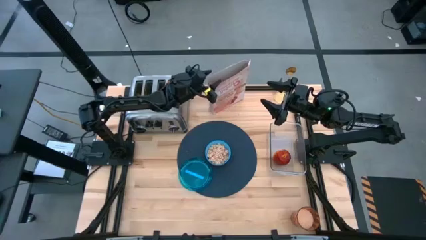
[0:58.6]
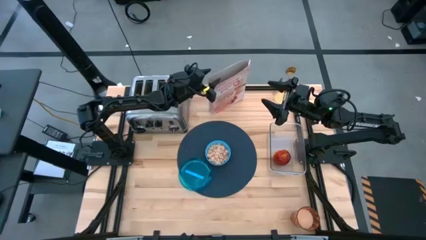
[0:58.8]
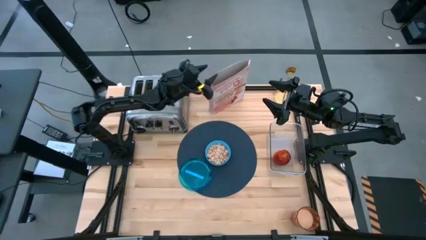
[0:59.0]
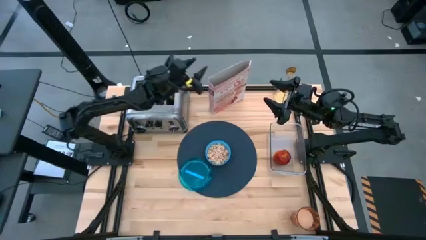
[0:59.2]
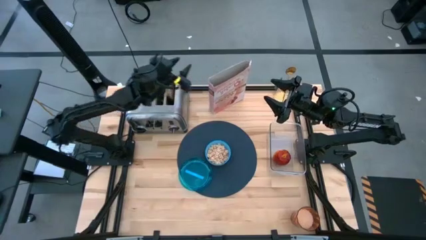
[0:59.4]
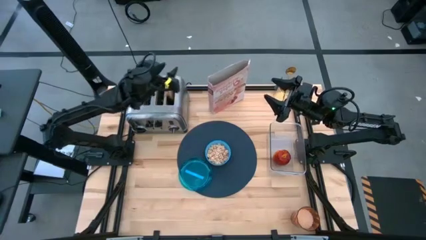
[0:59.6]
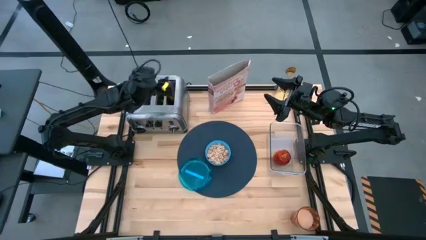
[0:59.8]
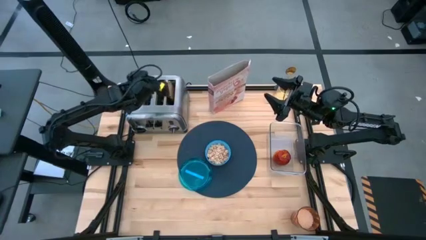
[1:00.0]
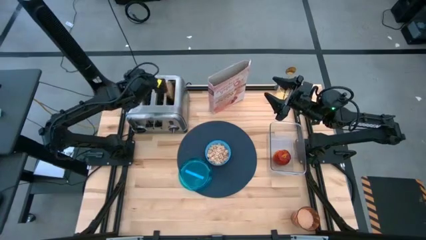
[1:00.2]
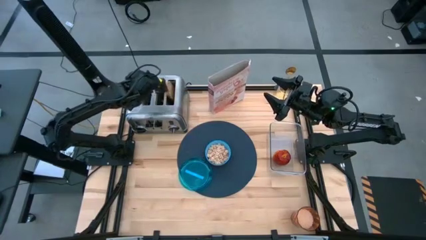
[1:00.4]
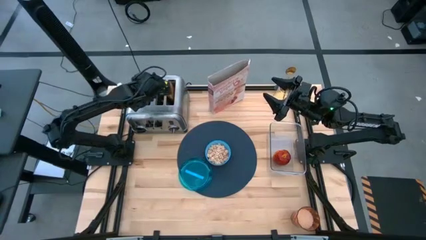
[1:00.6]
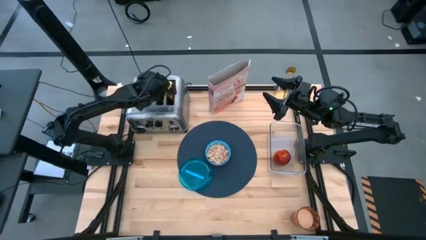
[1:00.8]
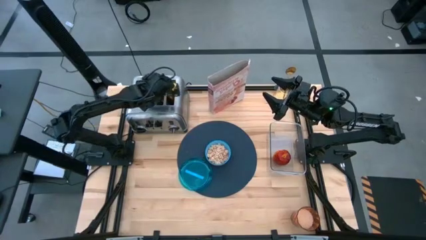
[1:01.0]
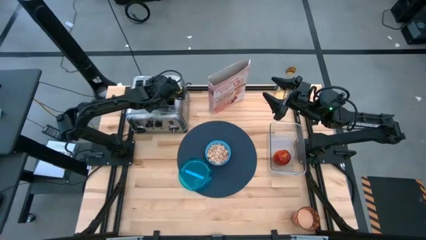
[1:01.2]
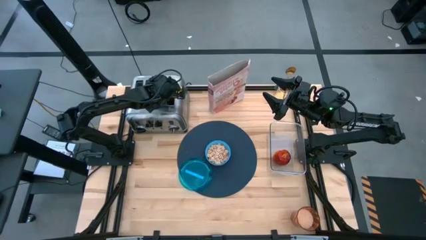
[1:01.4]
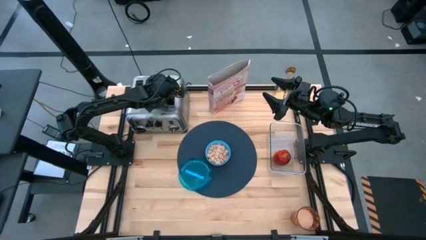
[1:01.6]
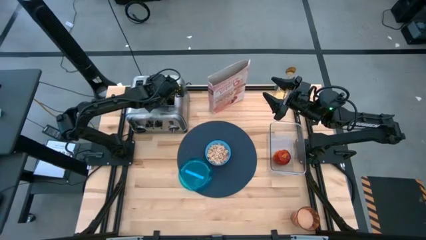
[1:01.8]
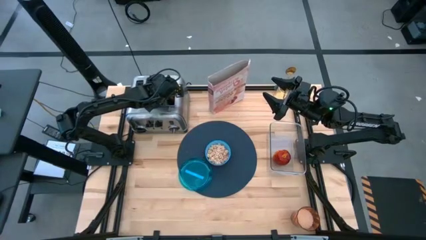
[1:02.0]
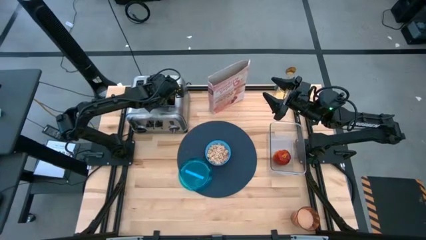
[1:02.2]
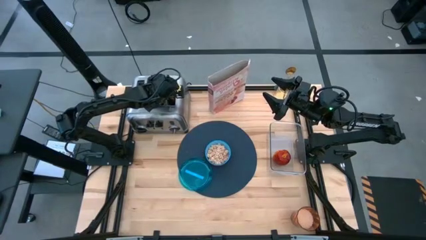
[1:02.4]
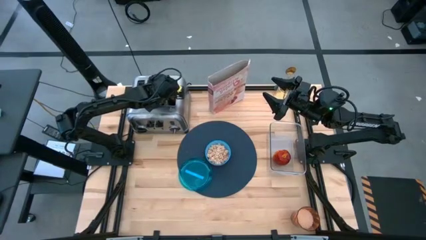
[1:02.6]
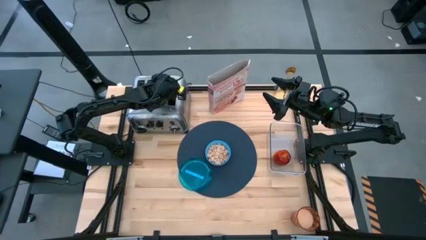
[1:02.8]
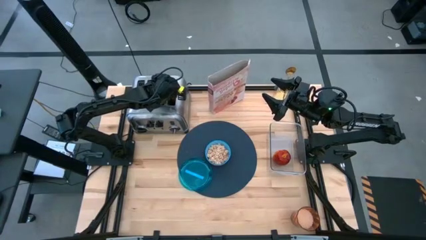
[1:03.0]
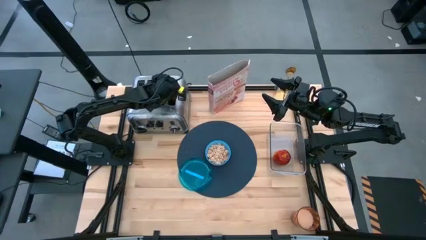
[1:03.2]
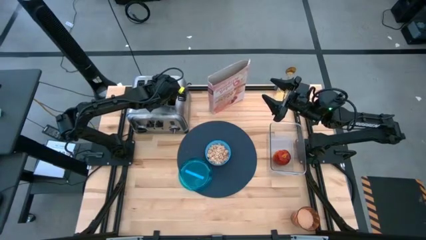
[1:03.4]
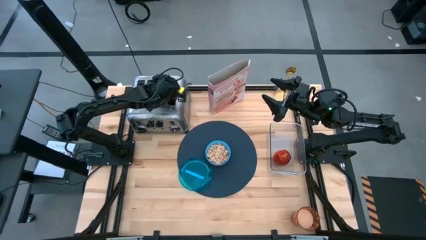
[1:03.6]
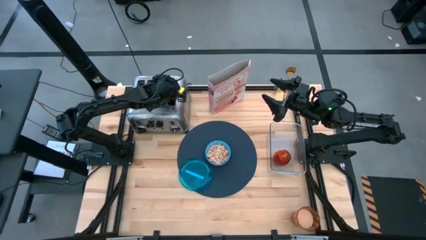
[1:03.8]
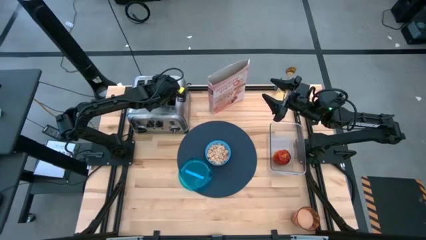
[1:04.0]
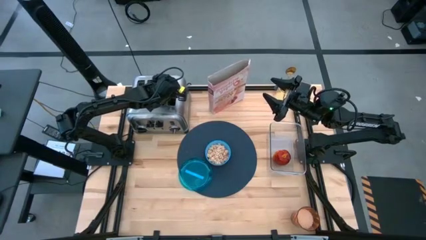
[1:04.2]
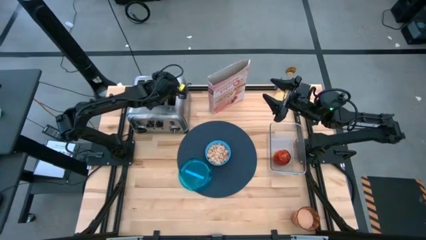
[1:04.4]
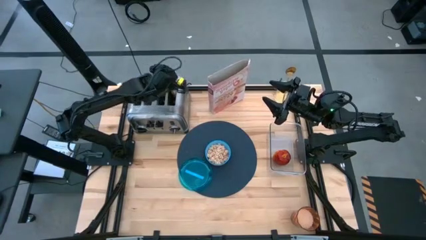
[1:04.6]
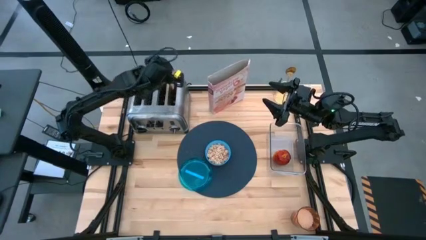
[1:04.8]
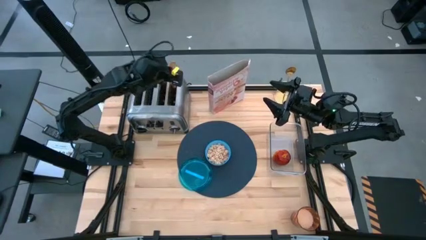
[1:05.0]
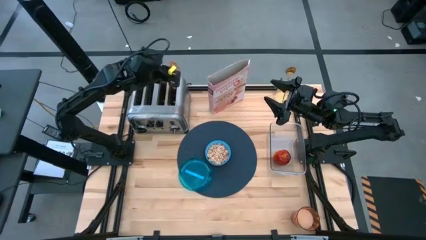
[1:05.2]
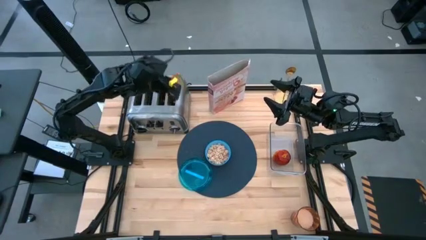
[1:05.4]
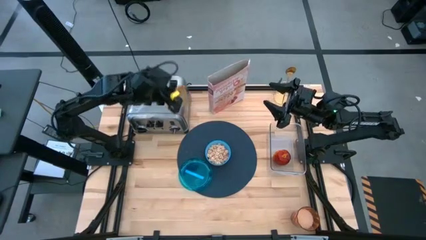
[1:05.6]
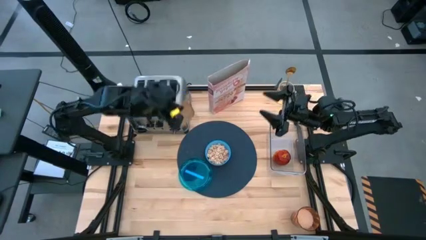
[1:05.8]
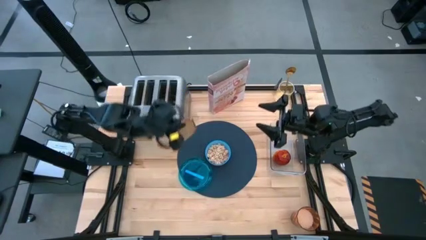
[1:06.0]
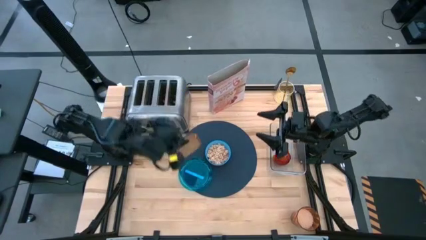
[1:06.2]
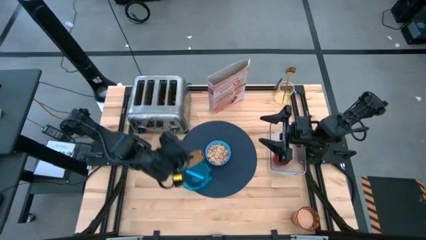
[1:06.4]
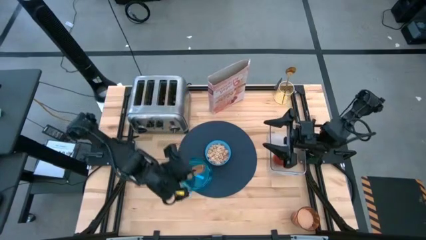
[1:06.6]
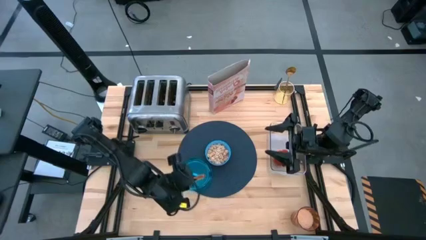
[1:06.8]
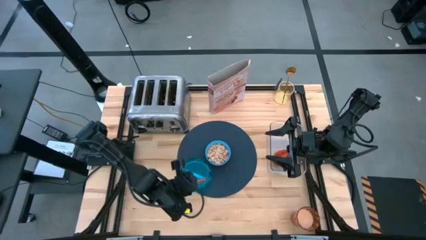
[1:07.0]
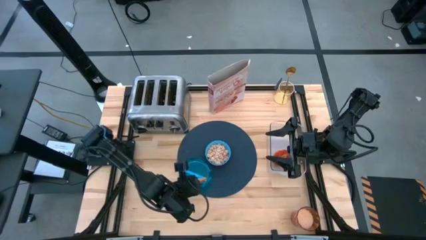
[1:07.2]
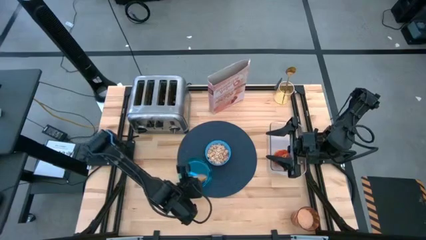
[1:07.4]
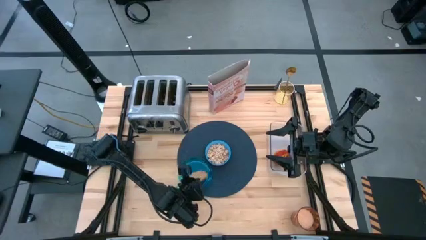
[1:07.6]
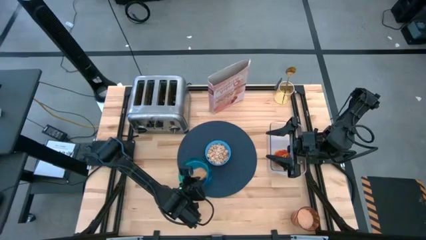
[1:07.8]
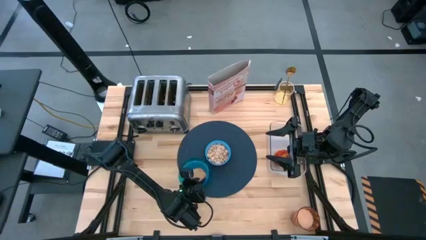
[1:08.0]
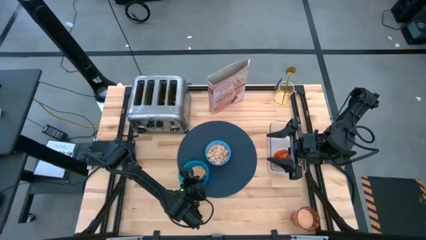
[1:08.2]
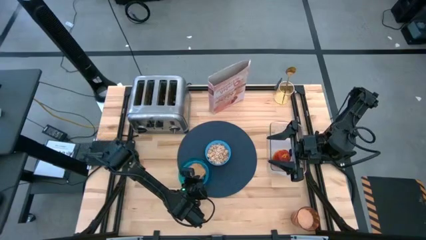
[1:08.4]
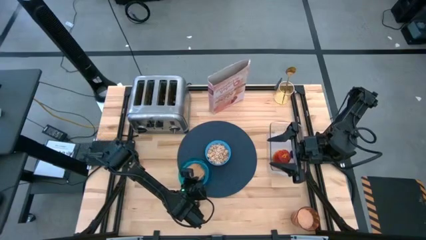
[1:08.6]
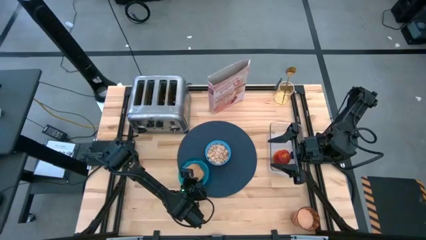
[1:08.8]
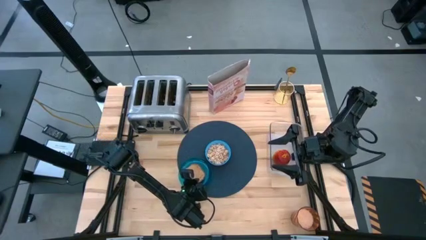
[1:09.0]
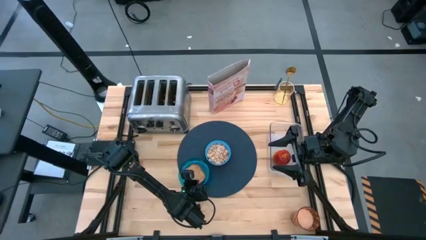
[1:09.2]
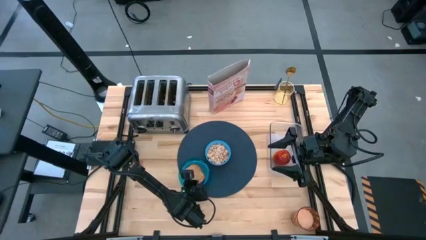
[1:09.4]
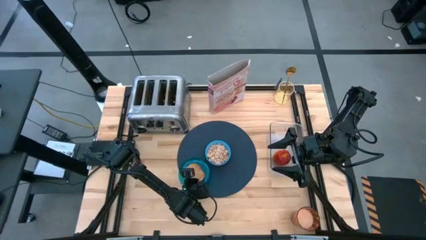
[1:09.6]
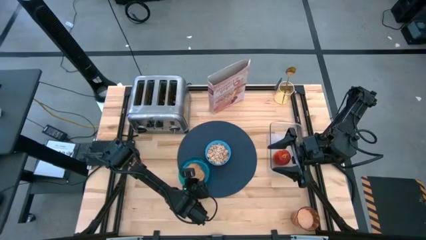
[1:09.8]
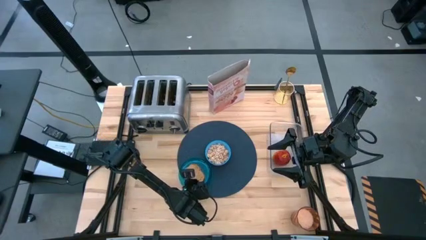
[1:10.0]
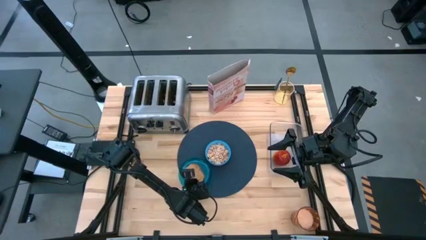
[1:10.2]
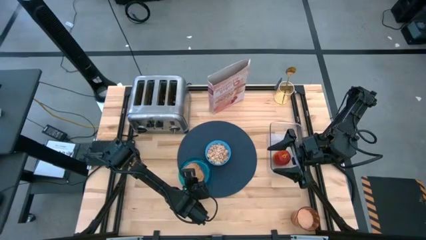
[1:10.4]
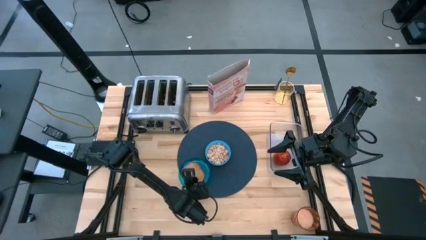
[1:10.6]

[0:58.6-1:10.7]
Task: Arrange a breakfast setting
Put the toasted bread on the blue plate
